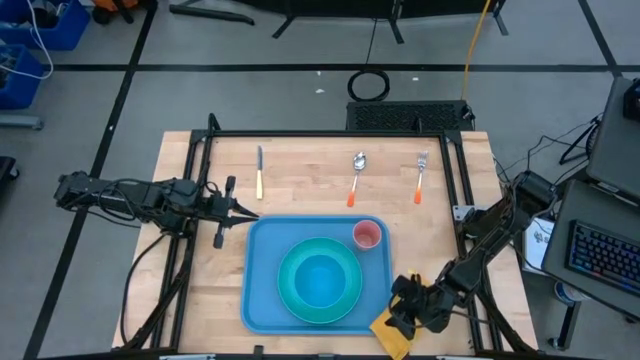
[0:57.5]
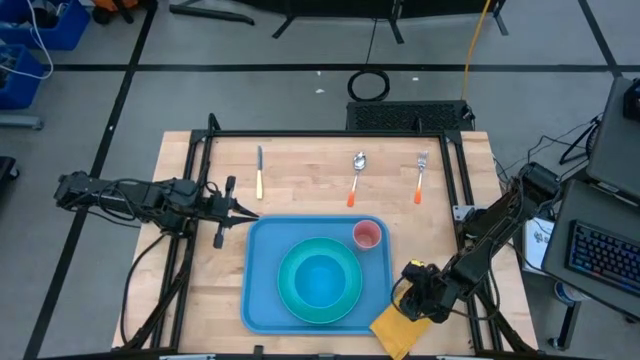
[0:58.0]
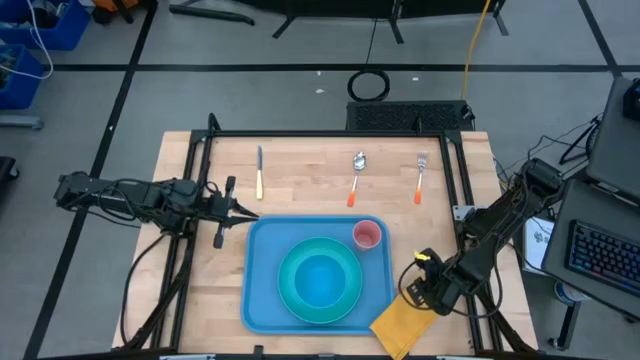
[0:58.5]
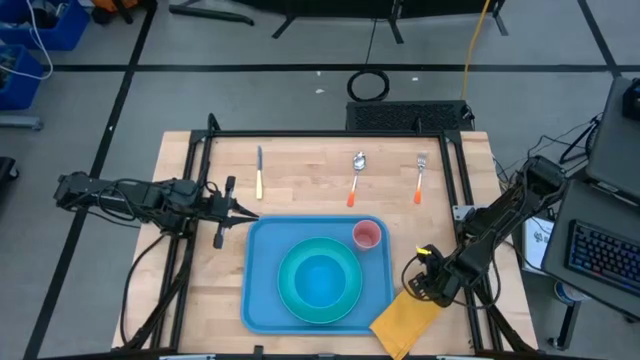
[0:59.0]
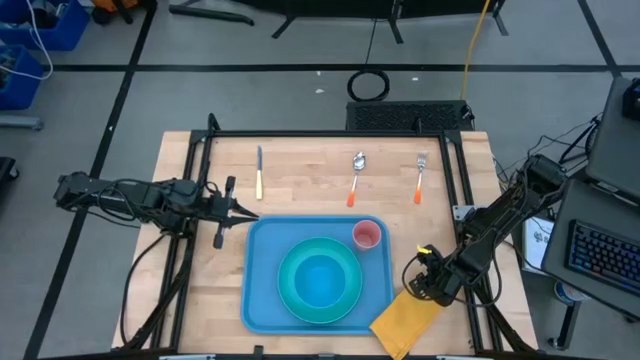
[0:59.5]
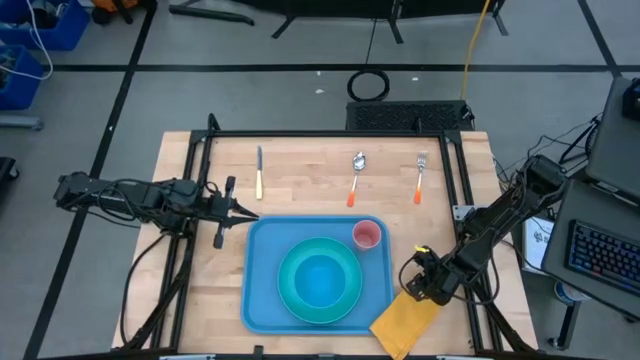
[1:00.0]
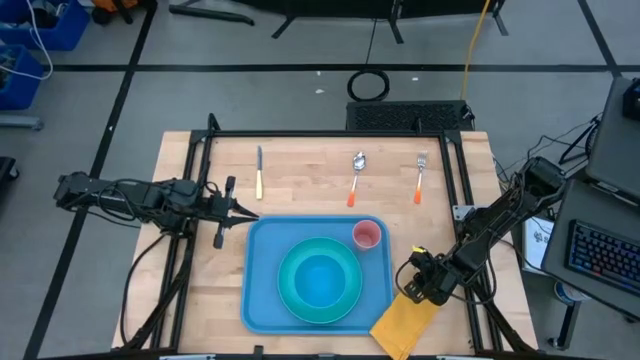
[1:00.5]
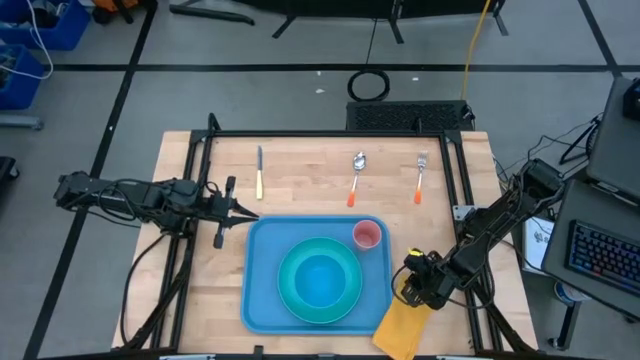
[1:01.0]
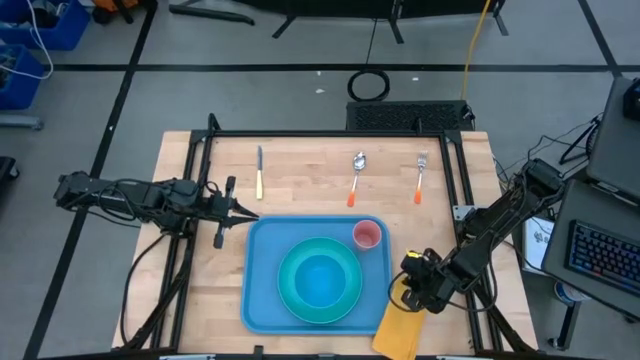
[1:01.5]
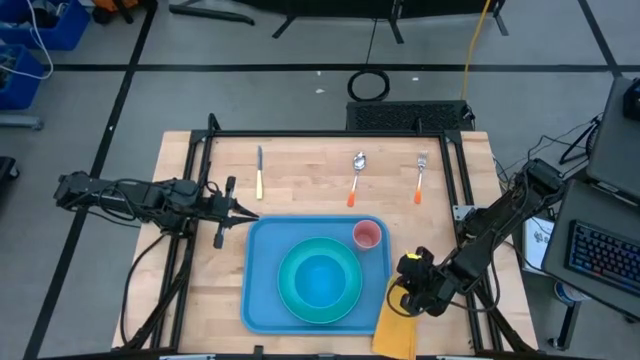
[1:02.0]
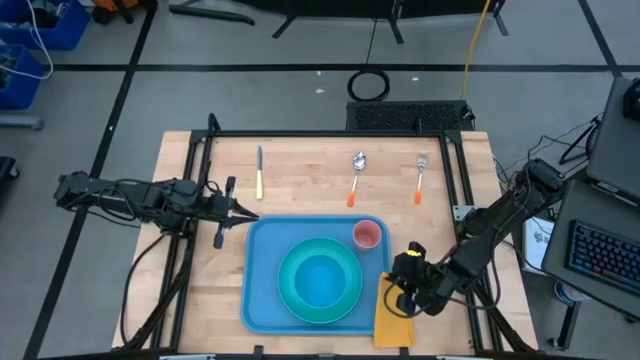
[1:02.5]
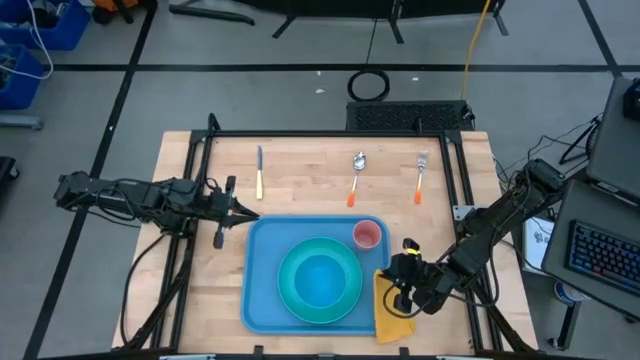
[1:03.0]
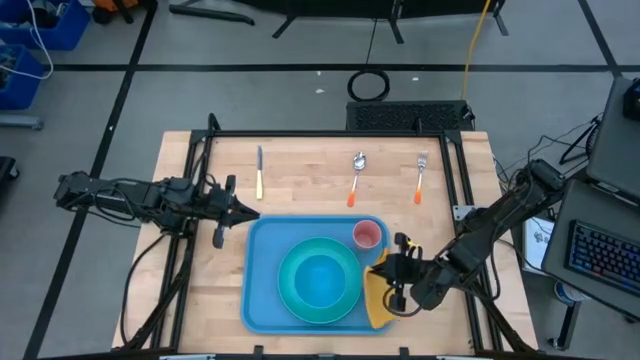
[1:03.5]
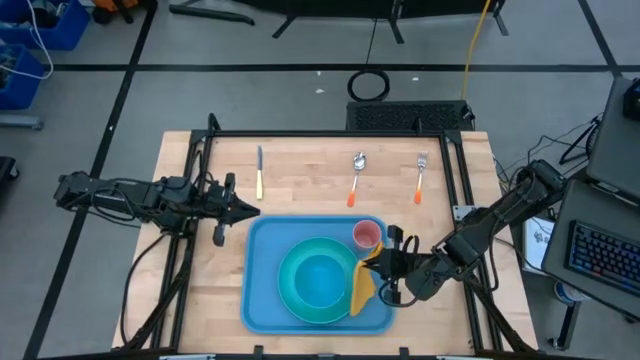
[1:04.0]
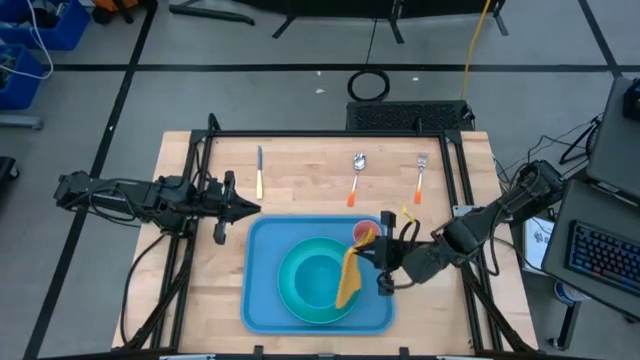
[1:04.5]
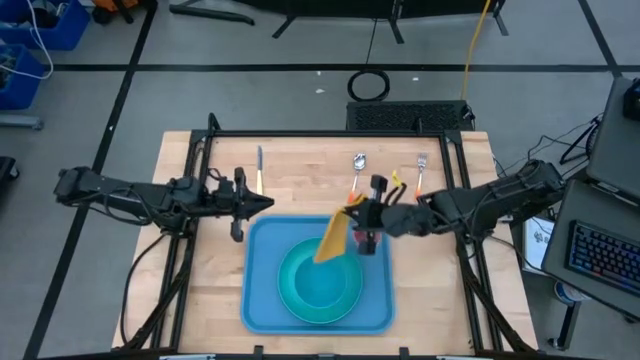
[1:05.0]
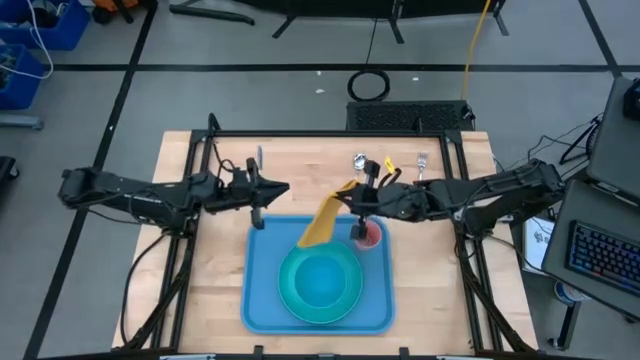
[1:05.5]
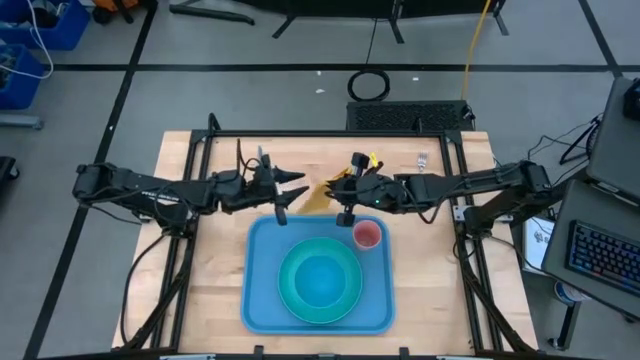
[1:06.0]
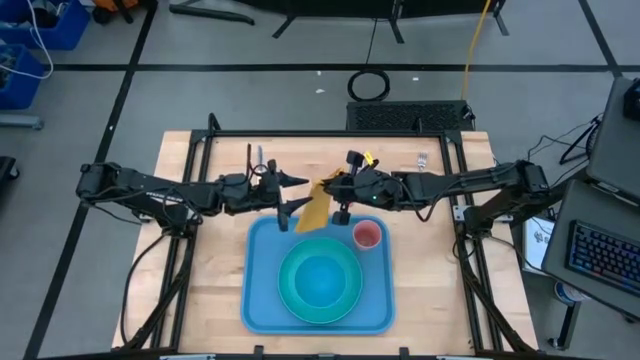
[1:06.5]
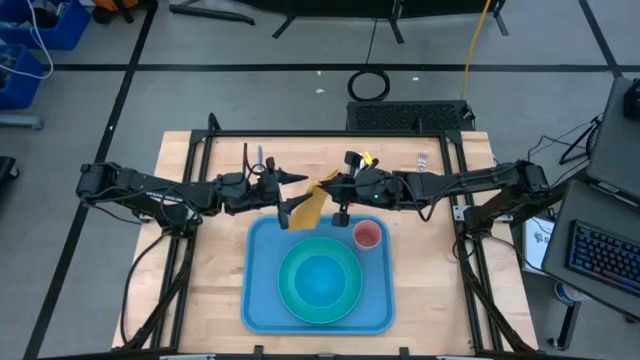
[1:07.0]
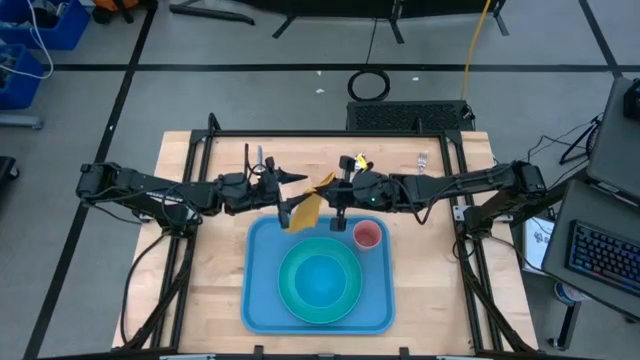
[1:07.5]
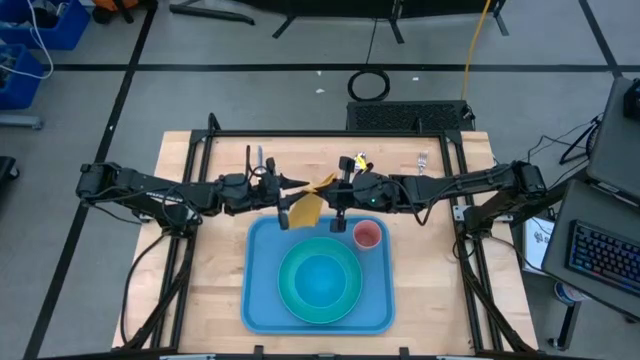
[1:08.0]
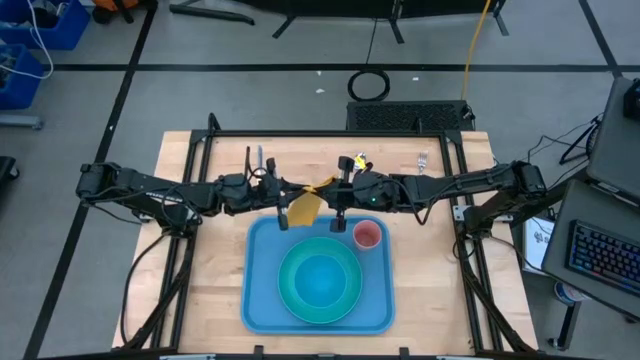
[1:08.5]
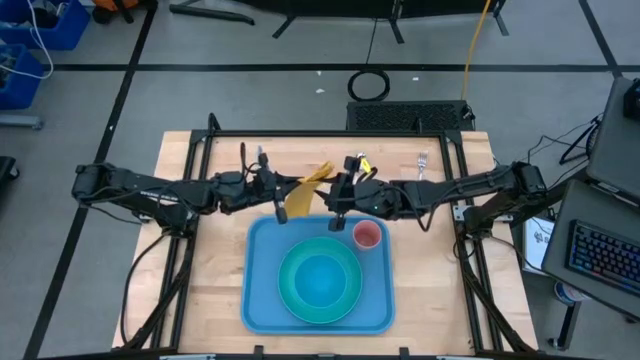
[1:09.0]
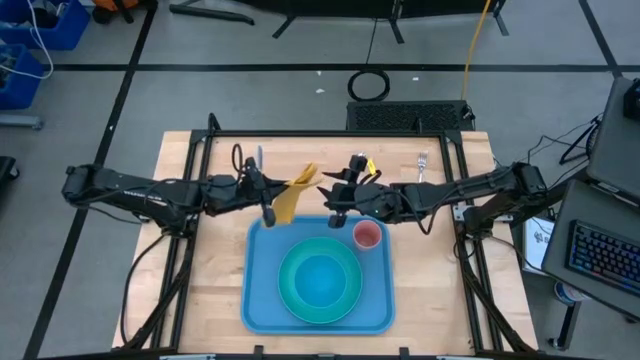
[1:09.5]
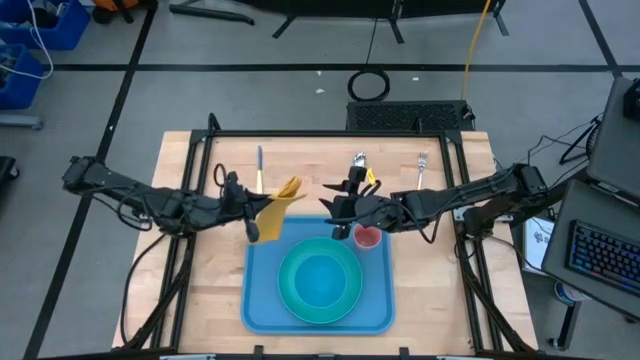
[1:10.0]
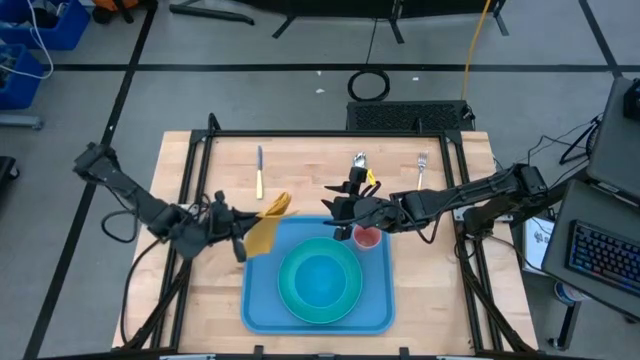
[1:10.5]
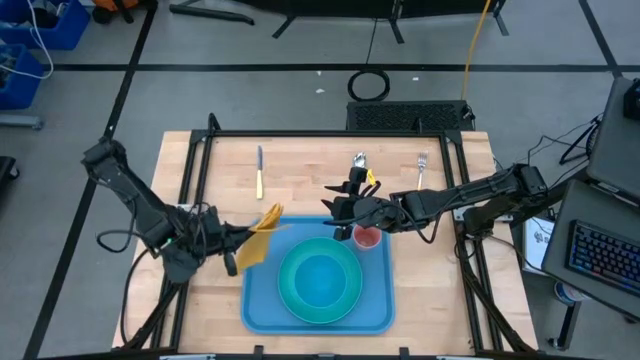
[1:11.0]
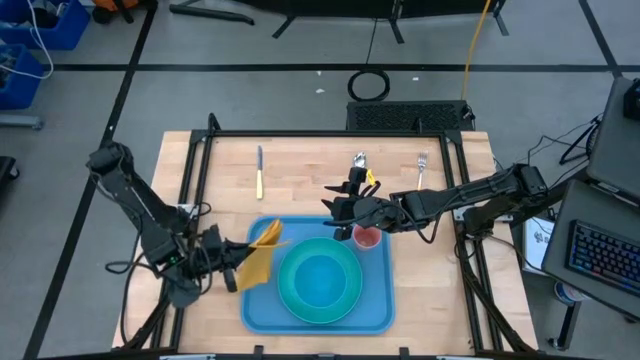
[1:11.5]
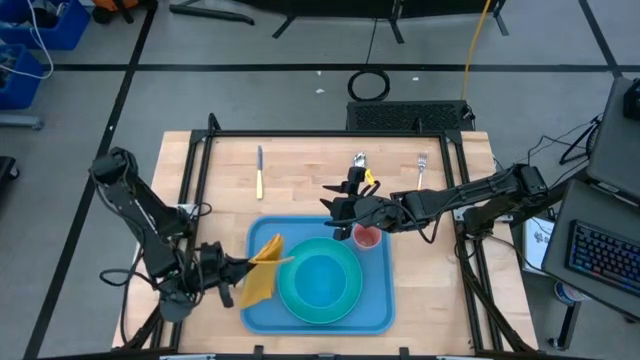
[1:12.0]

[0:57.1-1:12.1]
Task: Set up tray
Put the yellow napkin on the blue tray at the left of the light blue plate

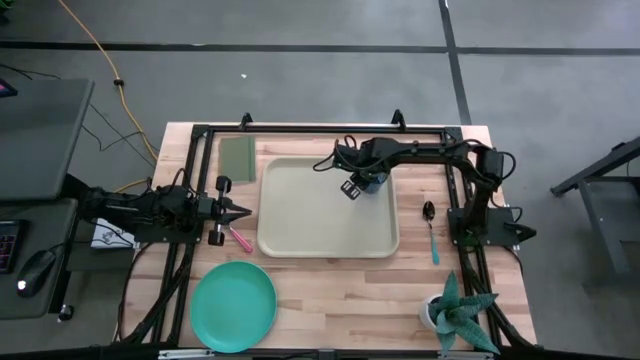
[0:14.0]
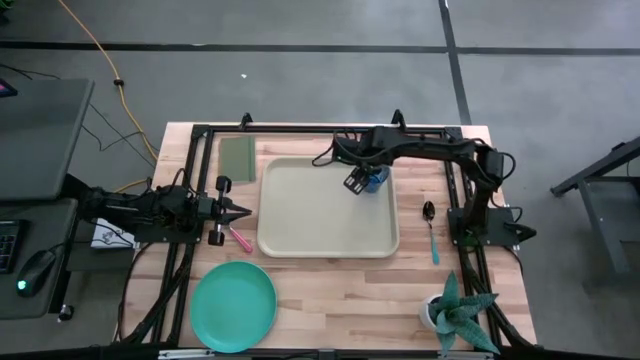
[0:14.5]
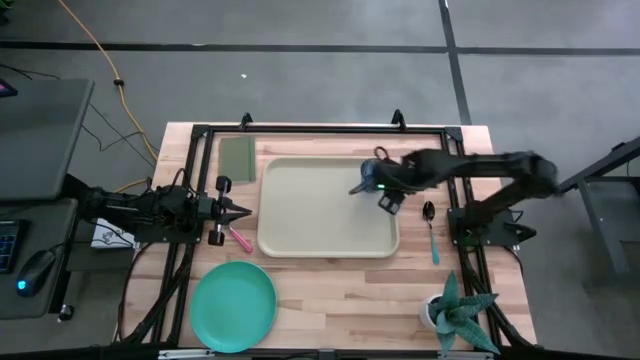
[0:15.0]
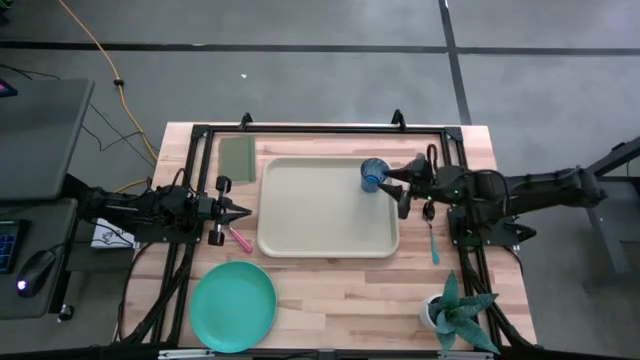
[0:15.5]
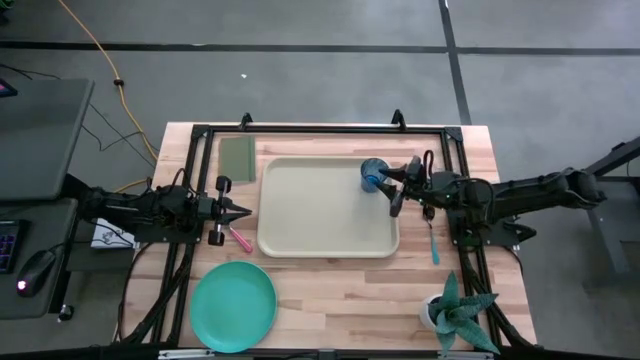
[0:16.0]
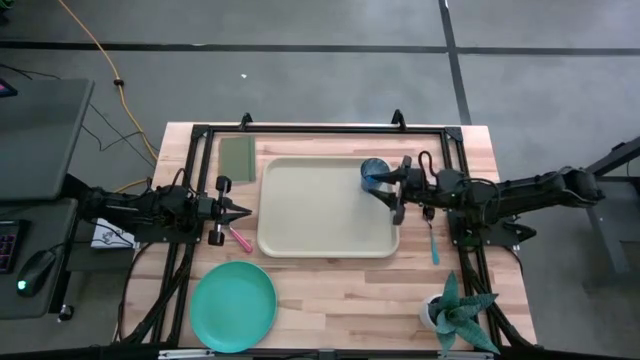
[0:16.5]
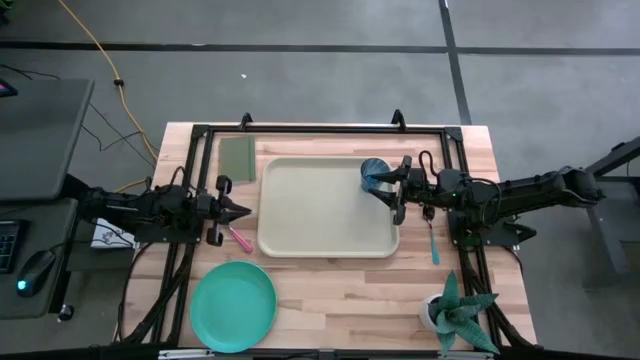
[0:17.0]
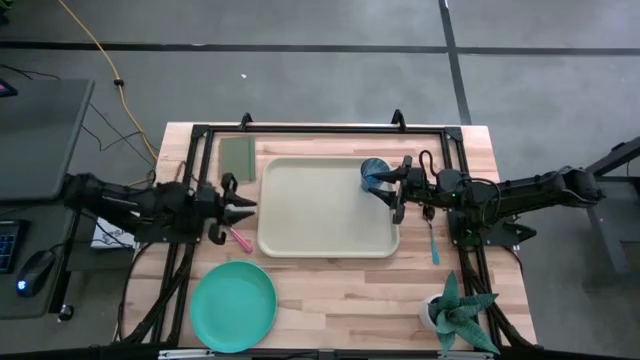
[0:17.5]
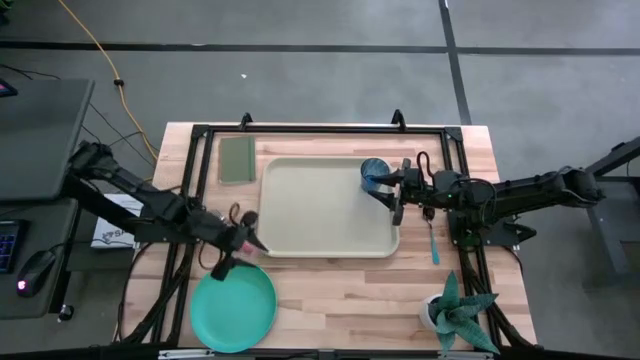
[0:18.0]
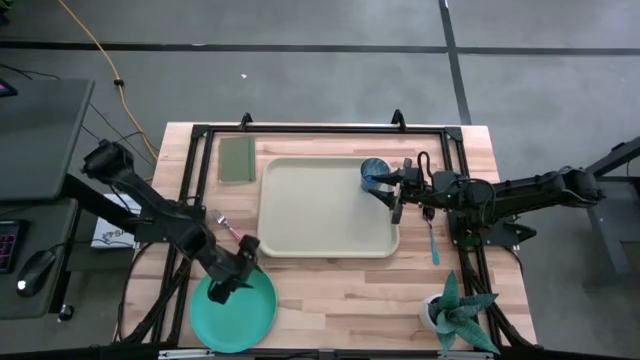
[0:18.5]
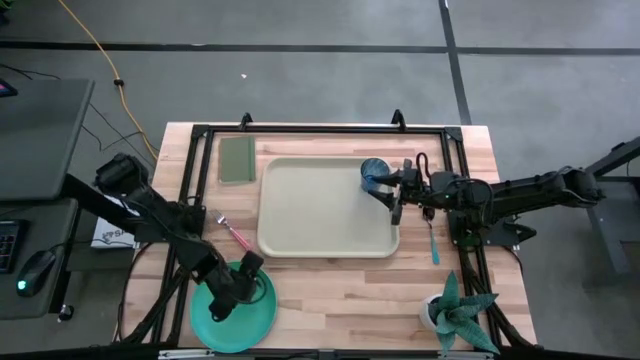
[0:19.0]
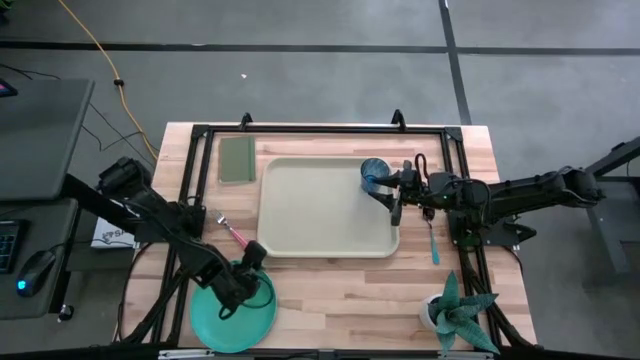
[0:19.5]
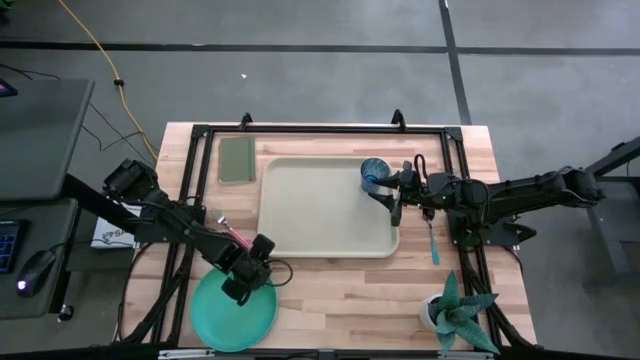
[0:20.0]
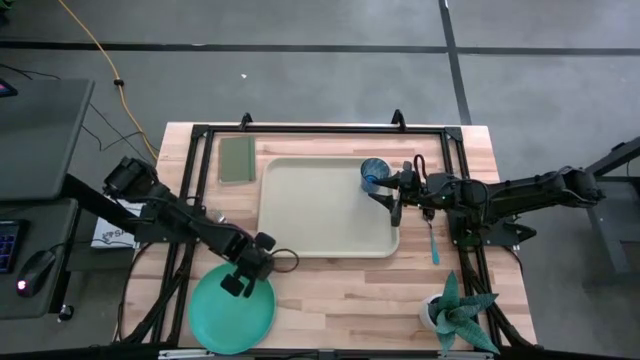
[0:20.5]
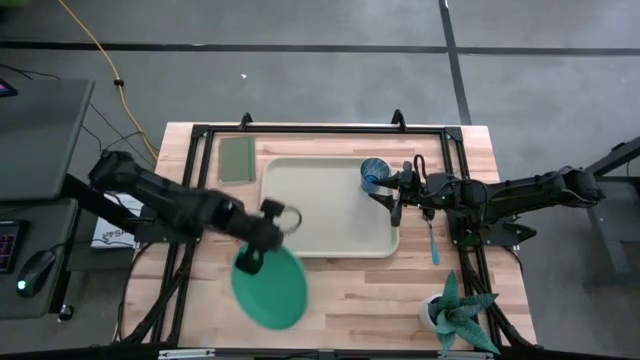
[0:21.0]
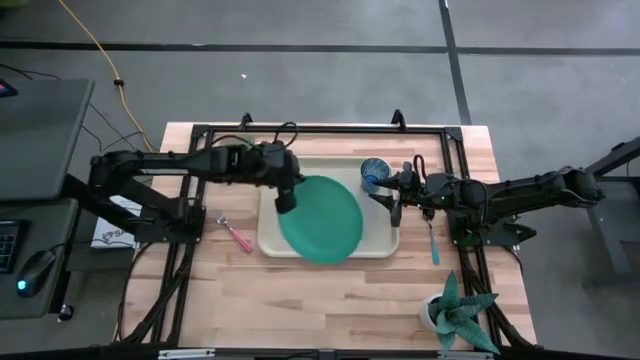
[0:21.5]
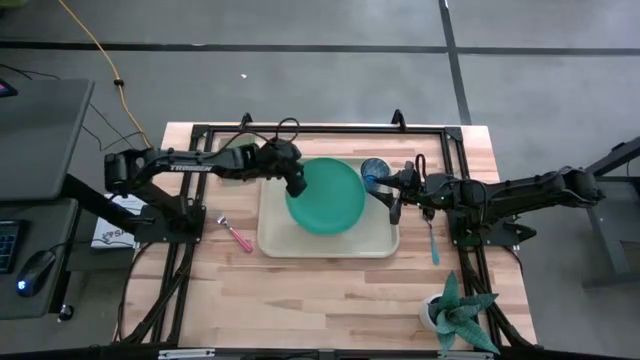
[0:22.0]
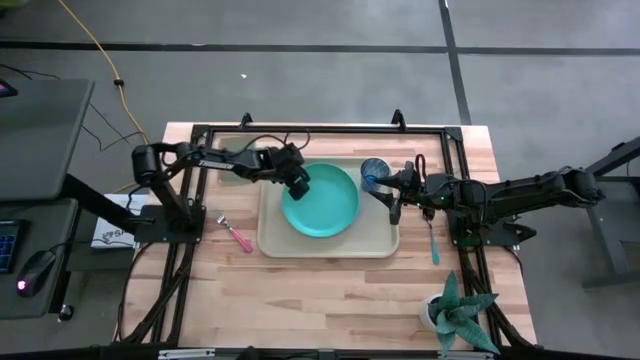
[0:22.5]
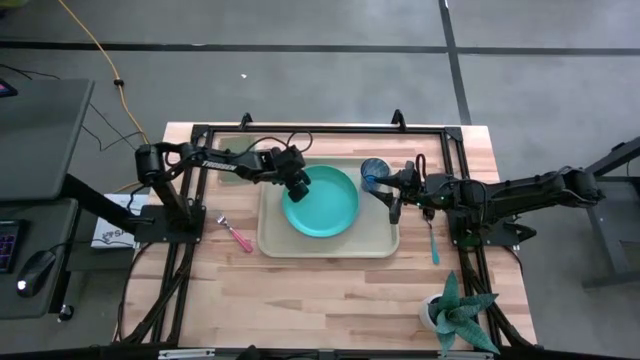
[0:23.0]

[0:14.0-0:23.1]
Task: Pick and place plate/cup/fork/spoon on tray
Put the light blue plate on the light brown serving tray at the bottom left of the blue glass
